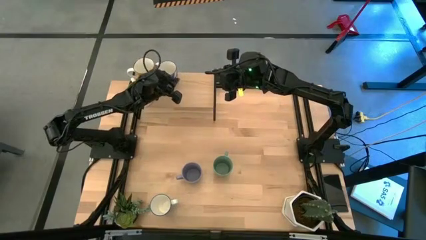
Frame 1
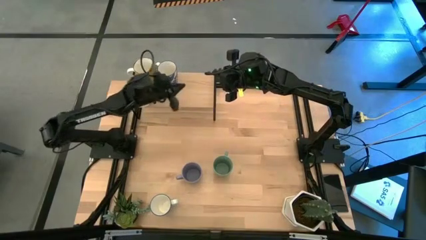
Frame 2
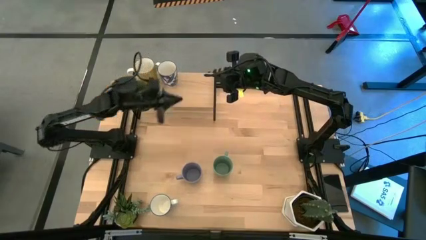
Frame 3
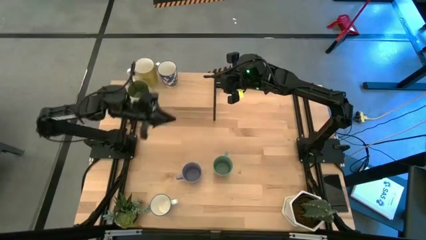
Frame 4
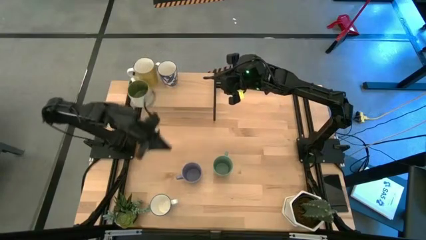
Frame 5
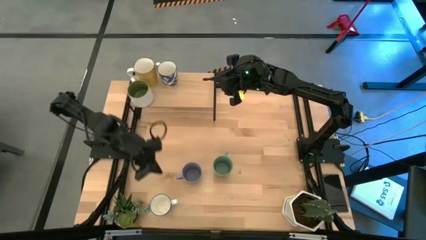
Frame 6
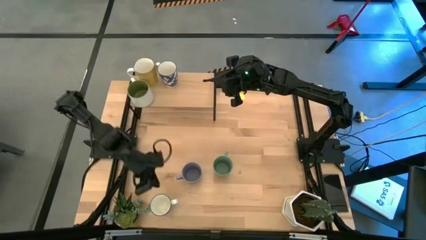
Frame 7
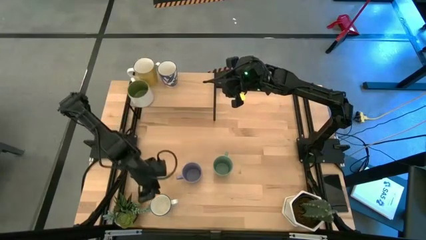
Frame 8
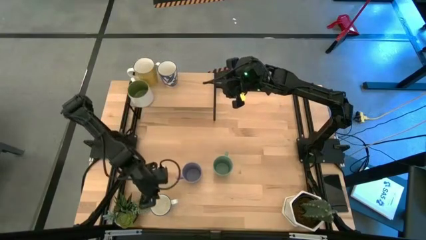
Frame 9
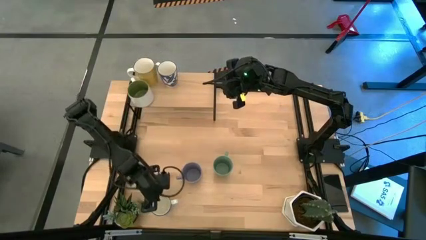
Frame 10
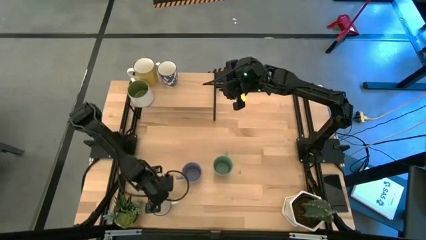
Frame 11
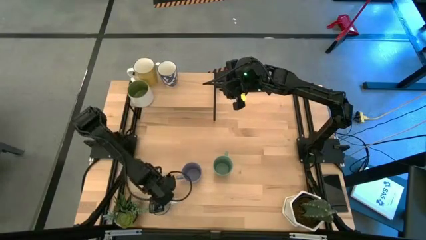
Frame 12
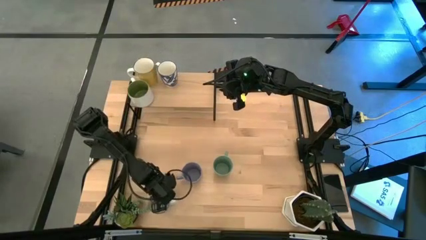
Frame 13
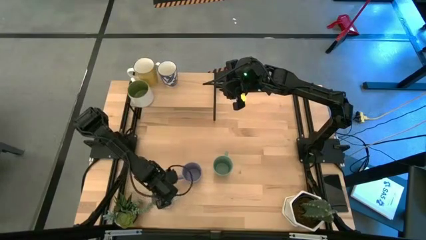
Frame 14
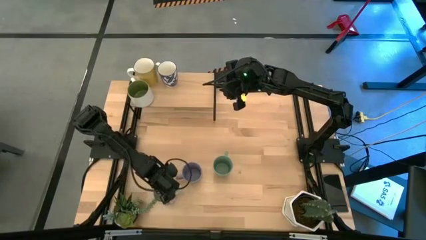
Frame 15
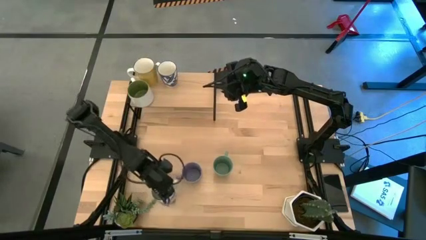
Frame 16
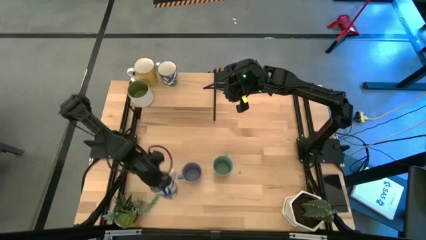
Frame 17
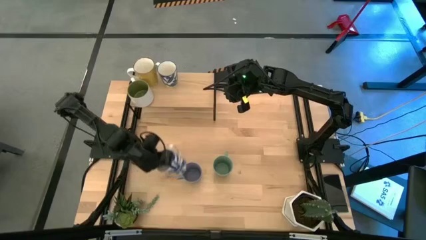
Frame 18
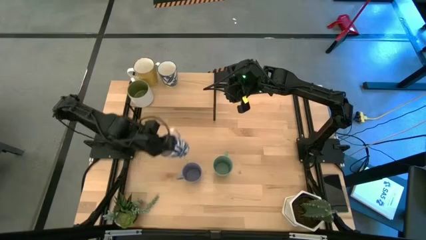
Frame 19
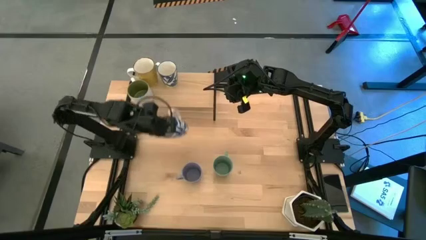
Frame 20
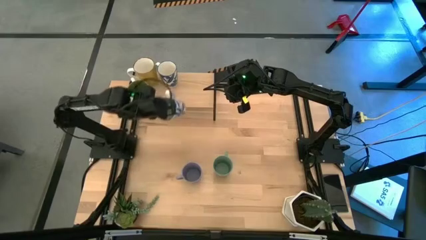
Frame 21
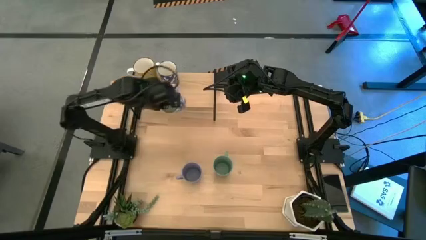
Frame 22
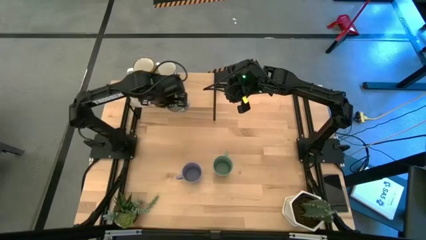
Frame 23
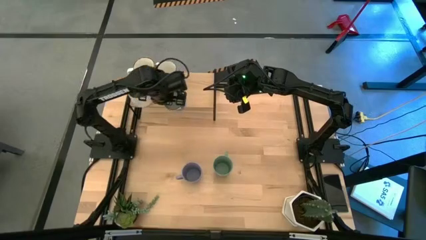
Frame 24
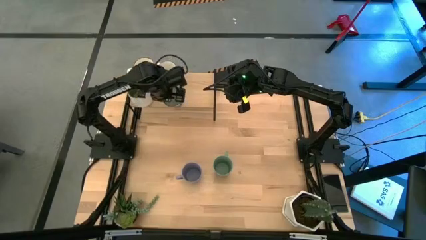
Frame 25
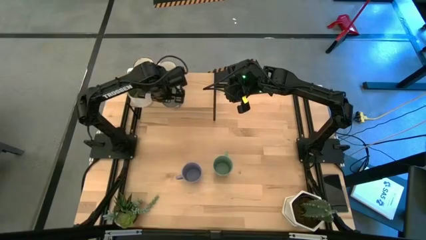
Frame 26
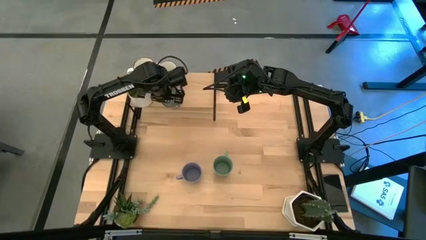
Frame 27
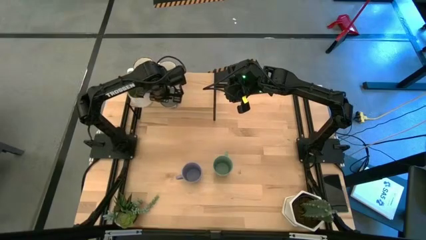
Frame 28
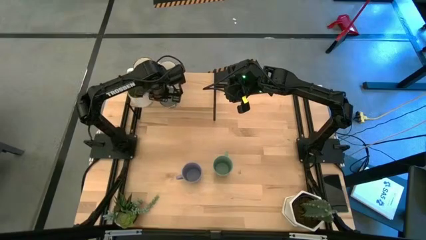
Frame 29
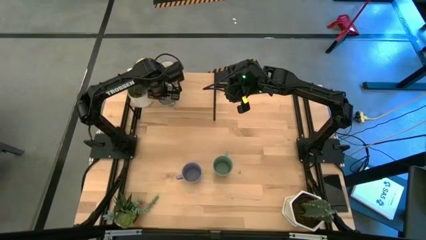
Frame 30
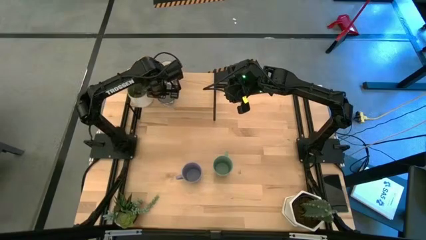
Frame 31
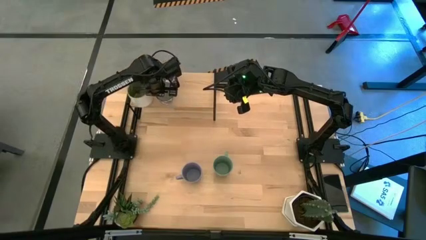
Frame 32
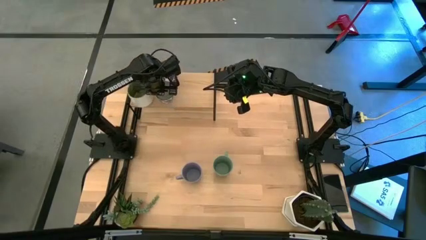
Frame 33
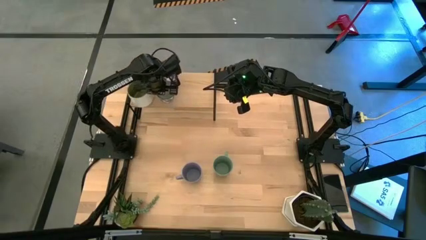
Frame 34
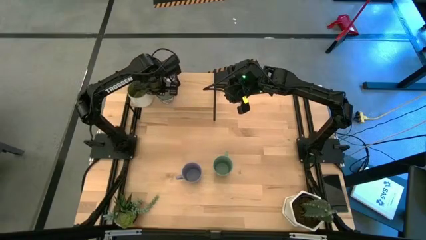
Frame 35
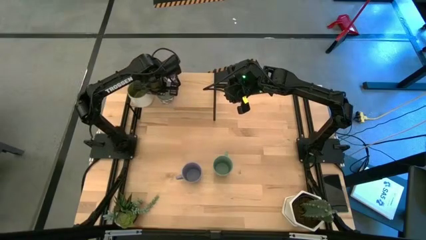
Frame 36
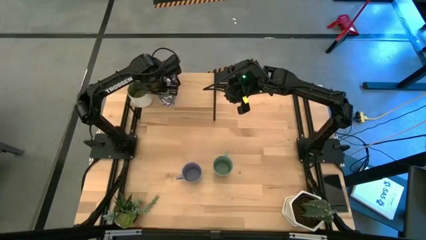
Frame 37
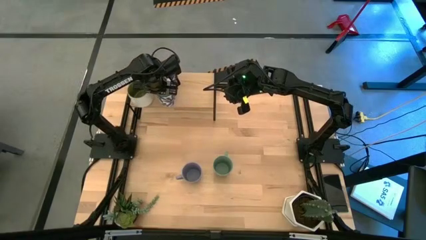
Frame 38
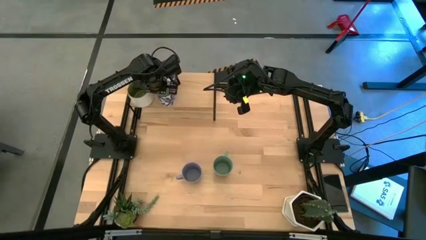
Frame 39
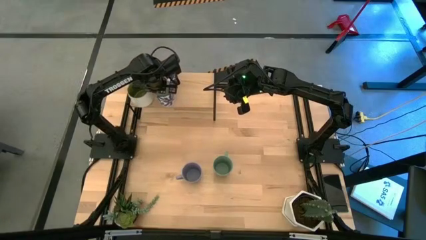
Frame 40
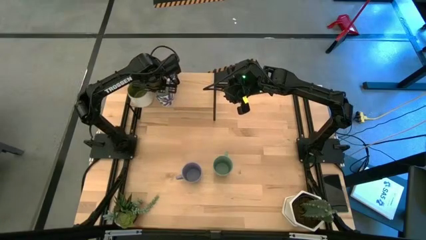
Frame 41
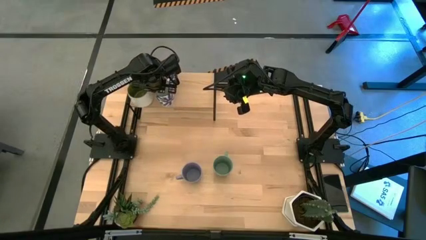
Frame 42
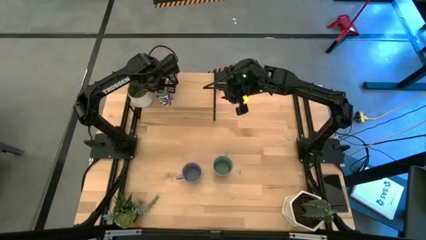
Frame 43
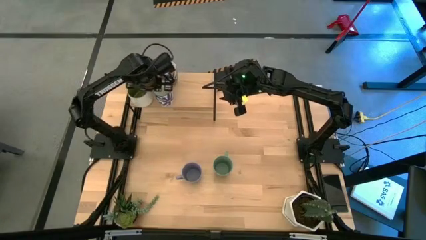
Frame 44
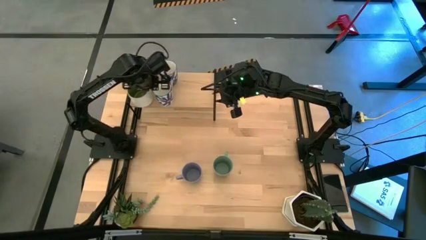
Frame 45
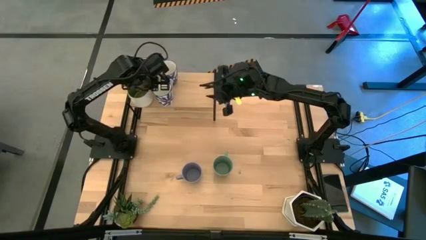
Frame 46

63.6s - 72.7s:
Task: Place coffee mugs
Put the blue cup on the shelf aligned with the other blue cup

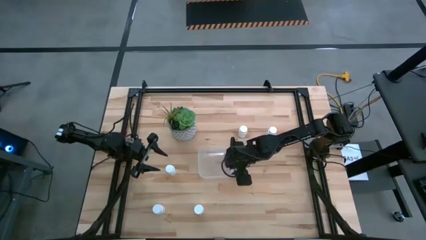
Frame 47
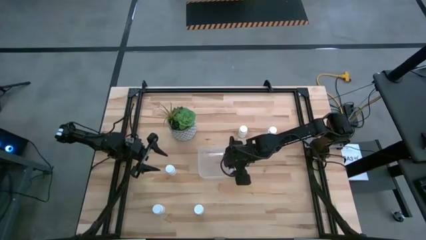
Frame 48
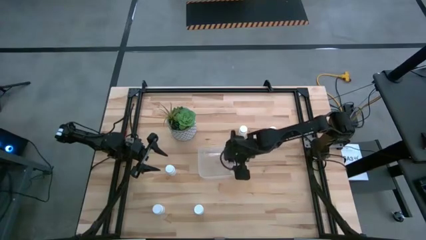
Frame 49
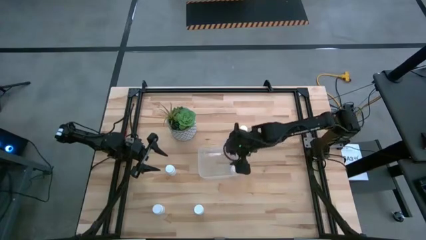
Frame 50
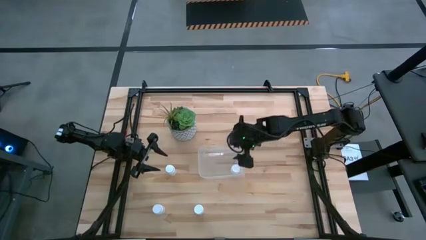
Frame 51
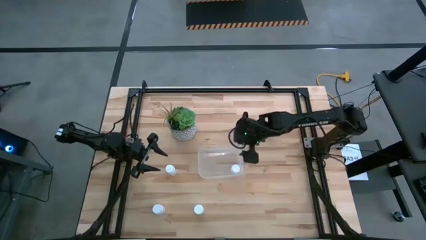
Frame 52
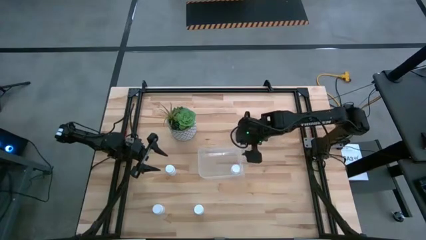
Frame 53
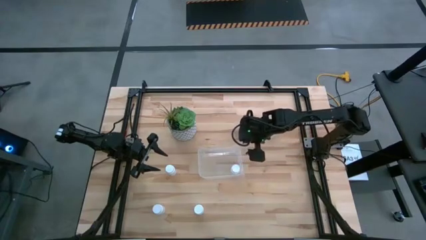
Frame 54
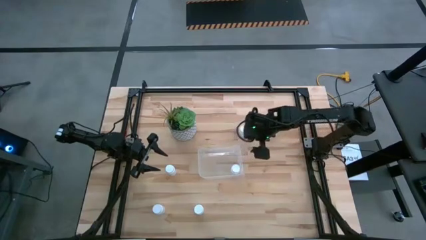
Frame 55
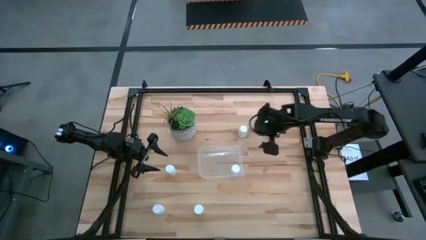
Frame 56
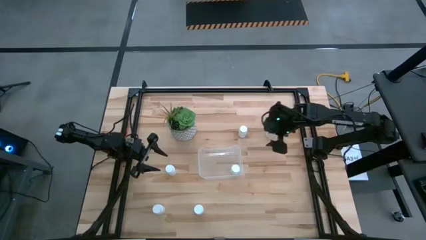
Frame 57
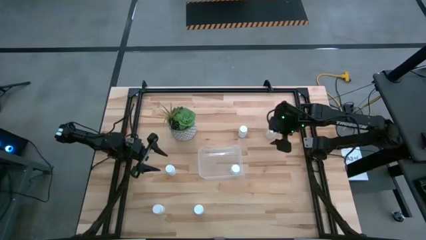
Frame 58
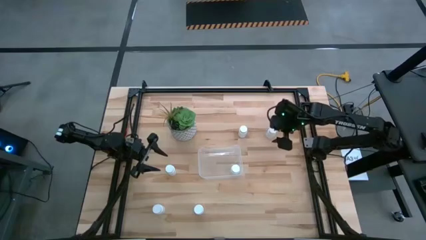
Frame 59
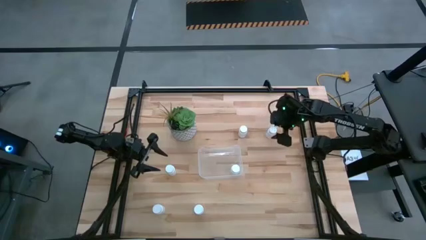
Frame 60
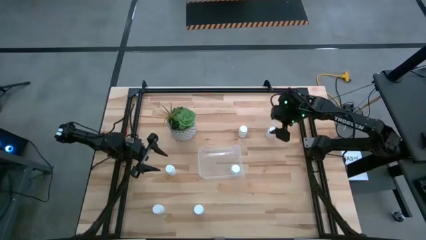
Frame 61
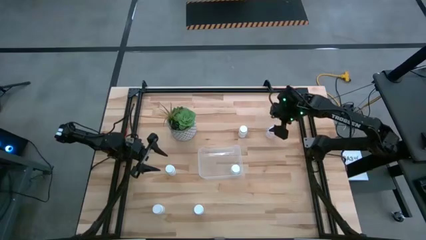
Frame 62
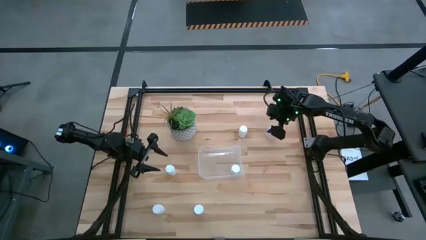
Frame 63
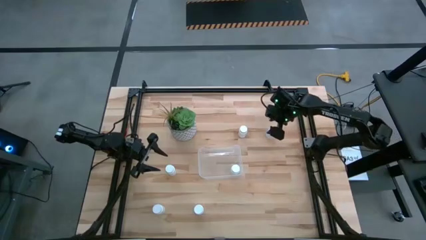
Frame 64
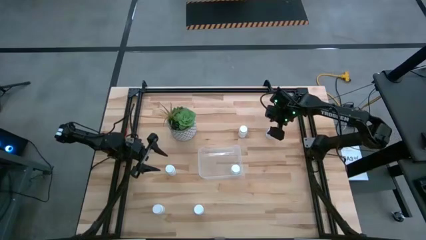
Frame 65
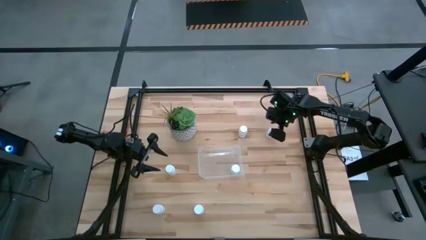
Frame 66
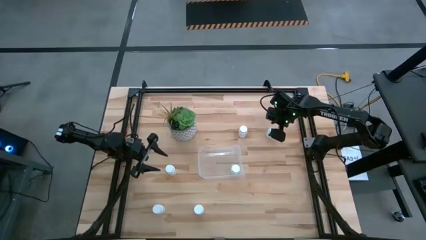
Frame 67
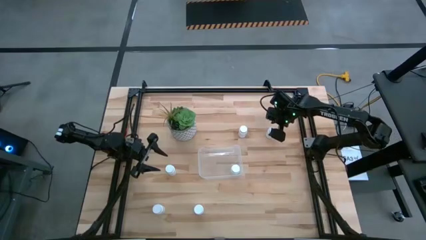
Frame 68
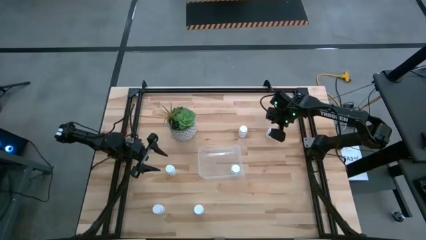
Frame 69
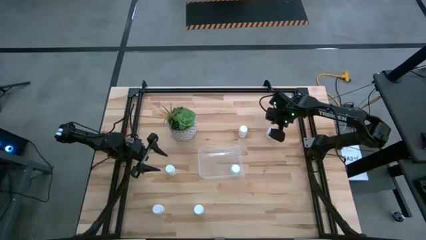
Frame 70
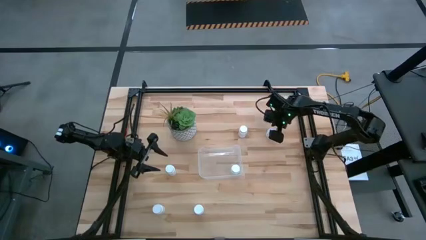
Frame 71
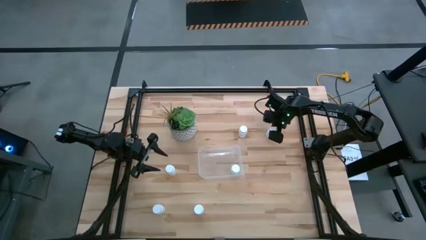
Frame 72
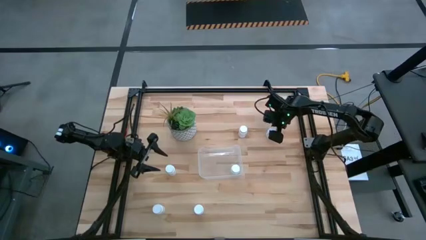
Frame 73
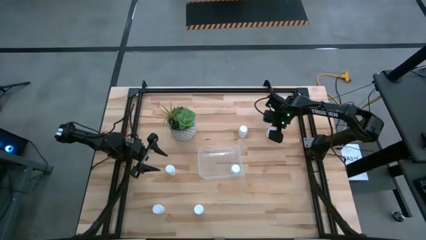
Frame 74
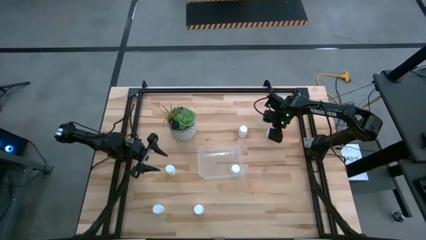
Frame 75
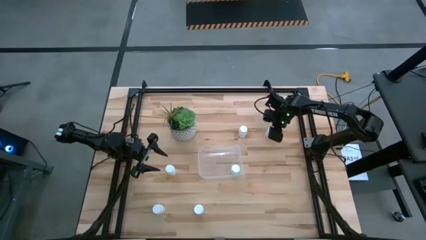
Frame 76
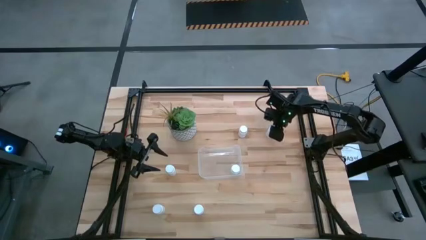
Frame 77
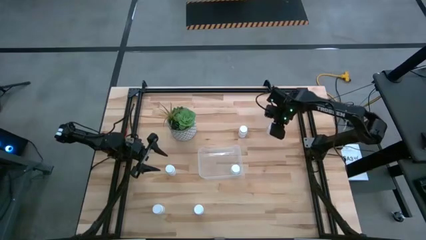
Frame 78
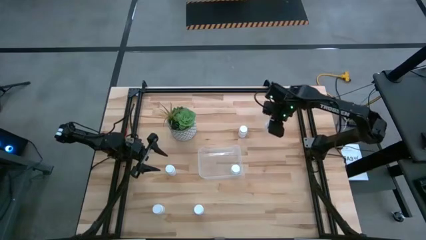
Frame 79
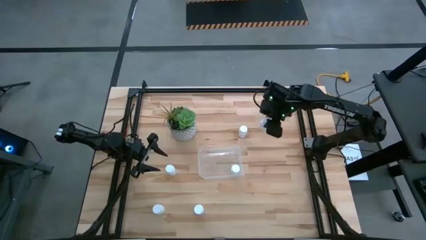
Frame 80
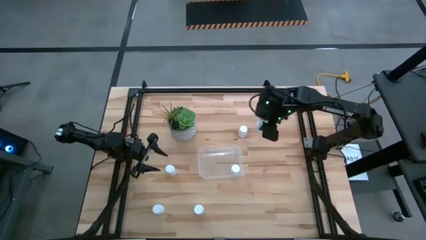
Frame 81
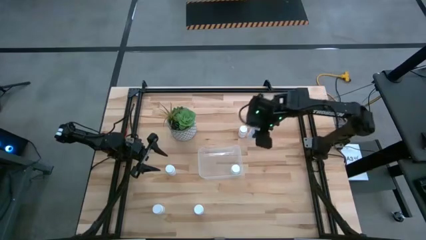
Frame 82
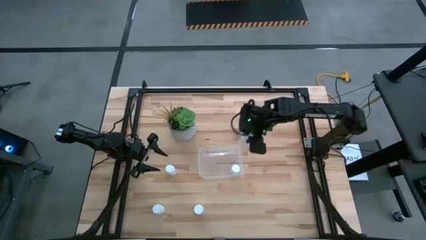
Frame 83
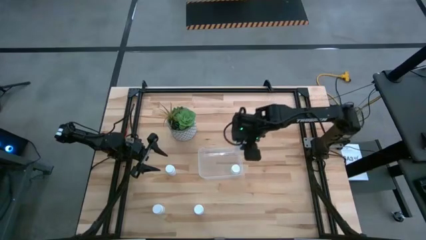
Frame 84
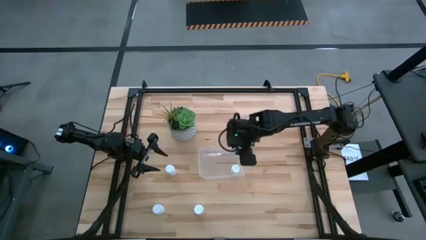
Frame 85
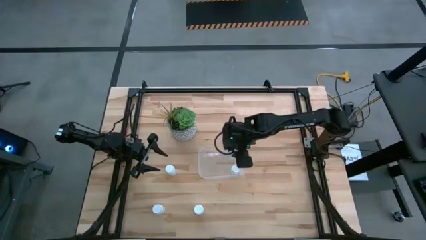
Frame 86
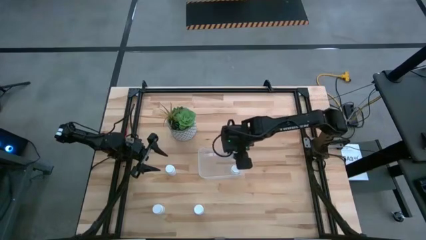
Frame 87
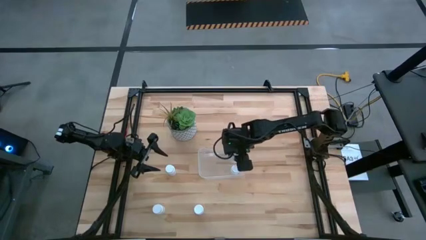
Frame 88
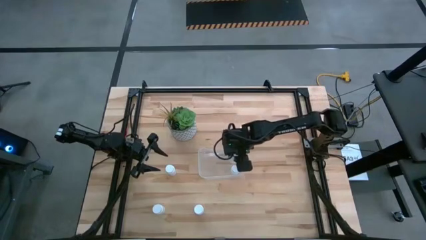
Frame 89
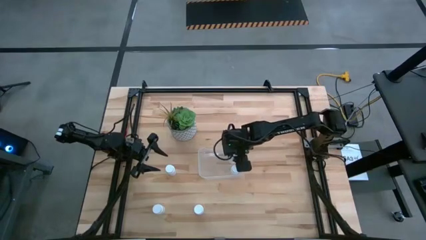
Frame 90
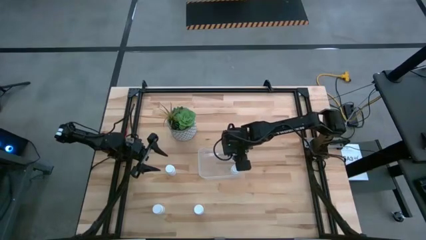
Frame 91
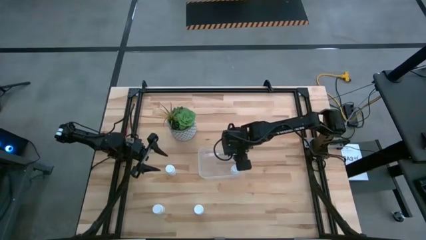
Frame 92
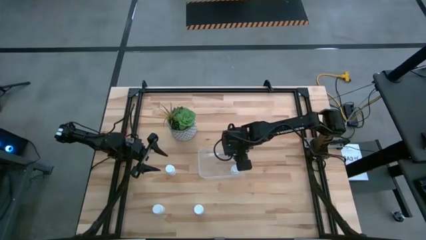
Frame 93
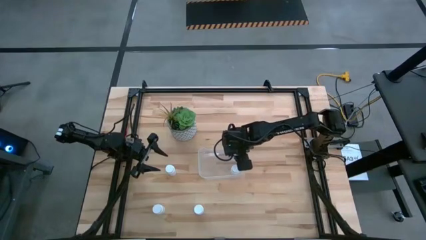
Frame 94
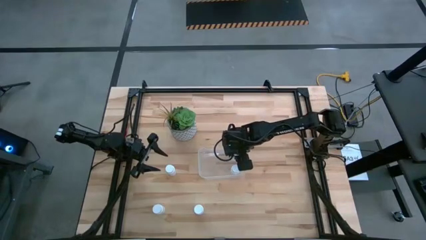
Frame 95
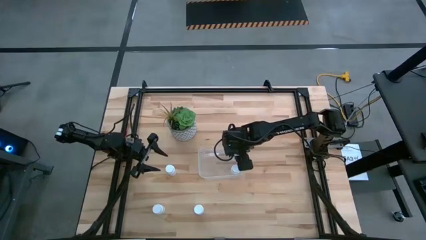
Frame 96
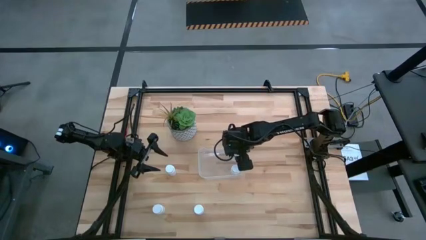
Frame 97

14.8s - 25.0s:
Task: Pick and place pill bottles into a basket
Put the white pill bottle into the transparent bin
